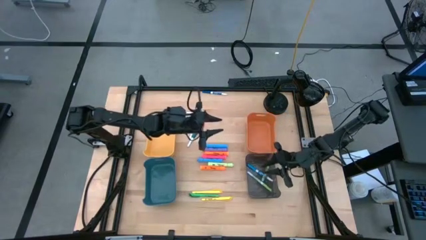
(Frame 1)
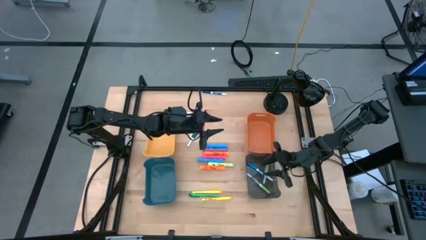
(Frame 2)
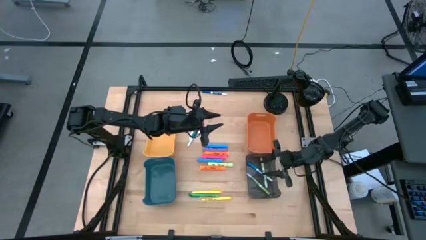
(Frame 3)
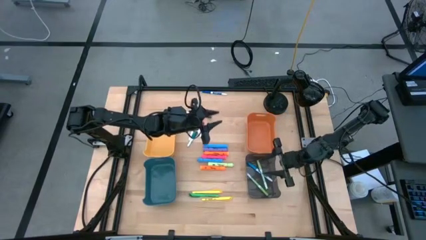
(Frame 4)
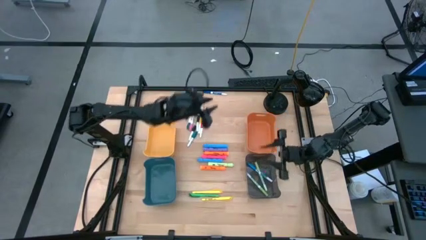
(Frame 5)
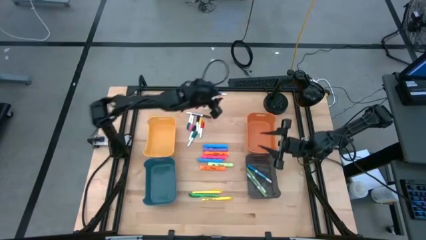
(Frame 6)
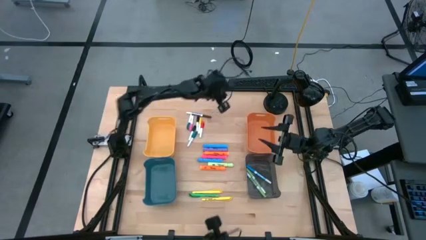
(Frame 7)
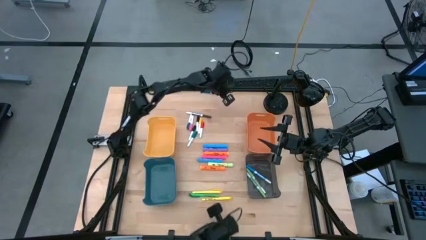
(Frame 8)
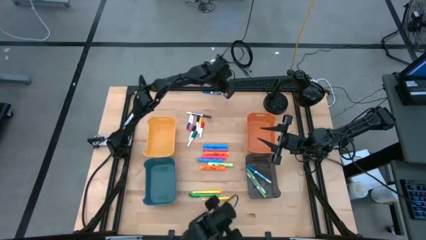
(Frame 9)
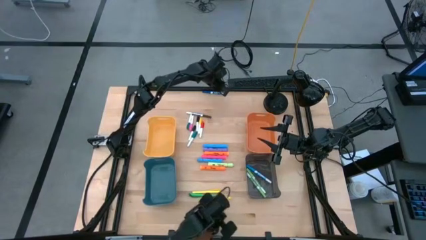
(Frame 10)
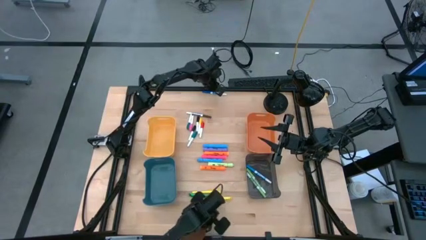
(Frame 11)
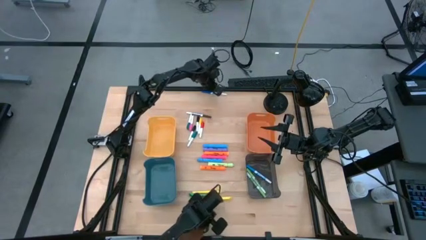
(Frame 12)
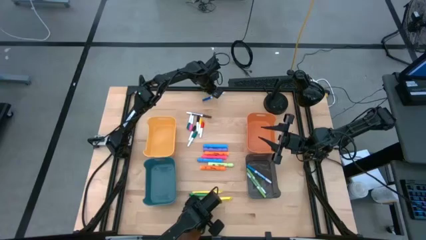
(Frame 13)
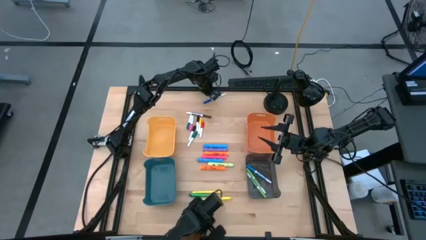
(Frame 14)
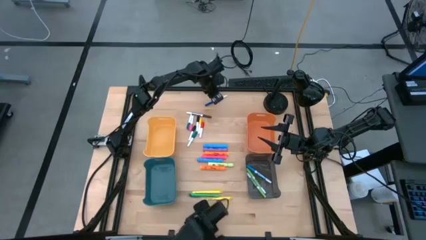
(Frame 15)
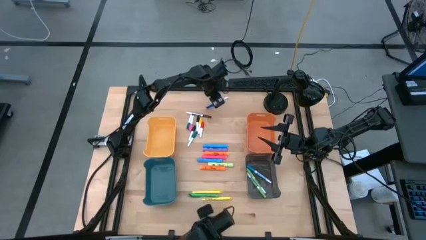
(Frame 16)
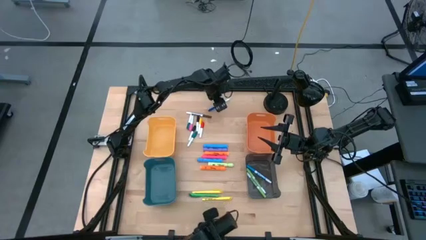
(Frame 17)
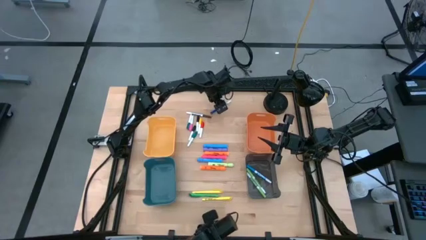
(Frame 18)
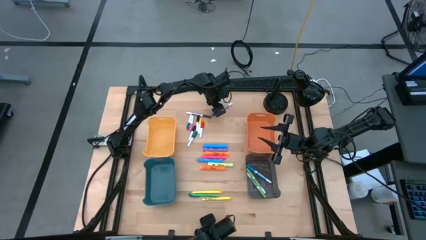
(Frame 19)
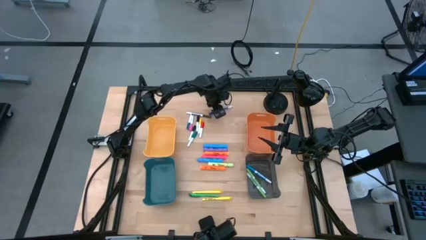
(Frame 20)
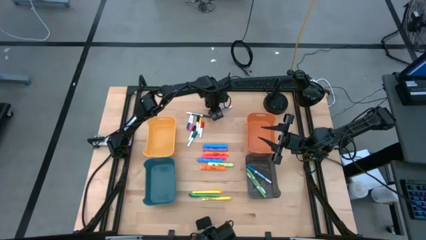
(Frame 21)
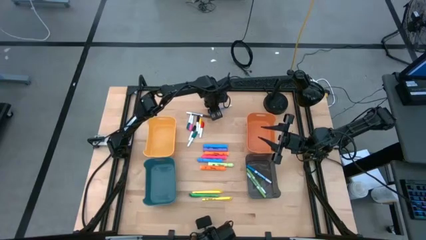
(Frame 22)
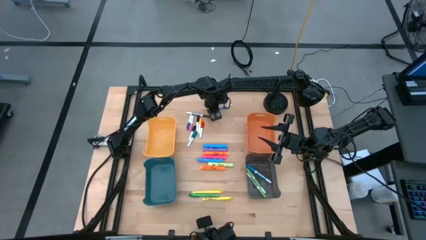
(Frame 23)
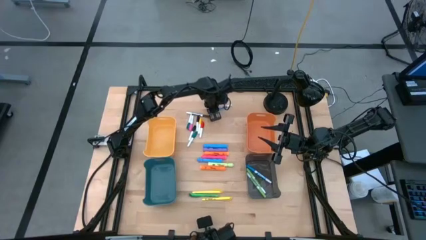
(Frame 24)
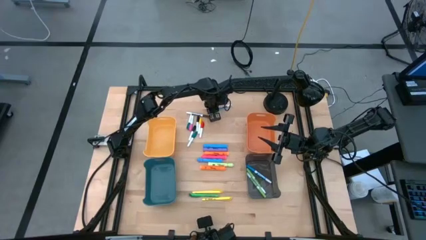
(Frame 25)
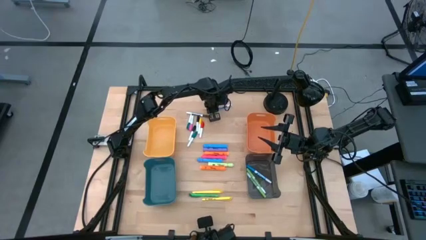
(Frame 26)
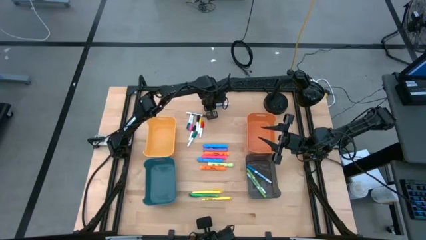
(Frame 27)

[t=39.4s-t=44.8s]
Task: Pick & Place Markers
Put the blue dry erase marker into the black bin

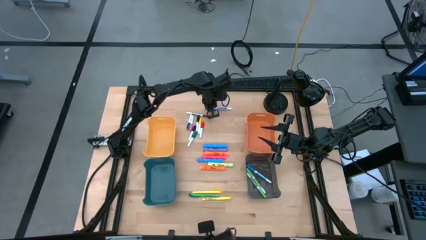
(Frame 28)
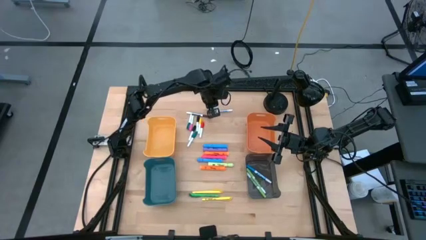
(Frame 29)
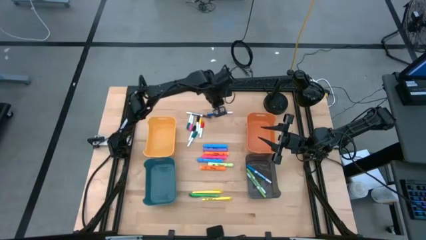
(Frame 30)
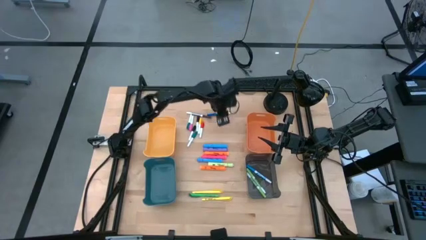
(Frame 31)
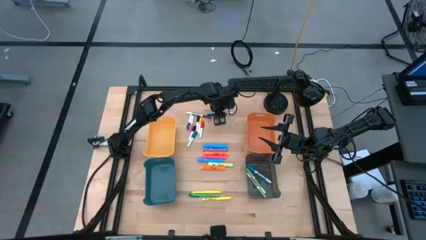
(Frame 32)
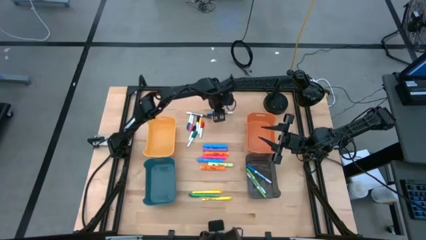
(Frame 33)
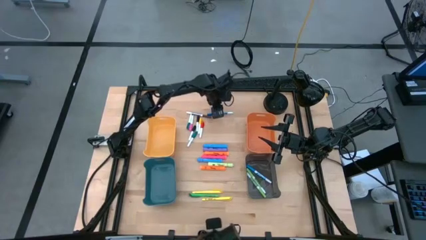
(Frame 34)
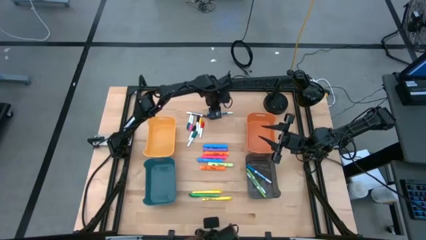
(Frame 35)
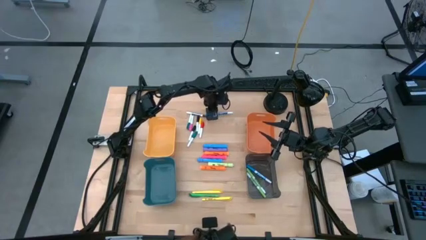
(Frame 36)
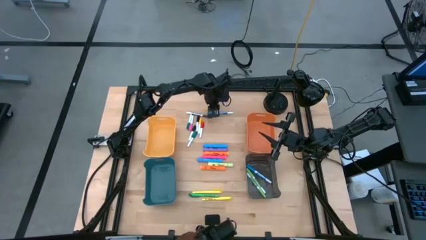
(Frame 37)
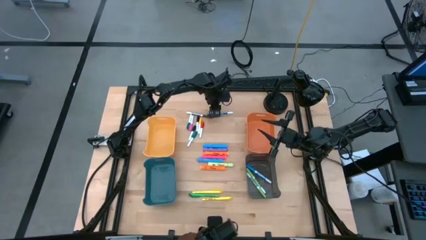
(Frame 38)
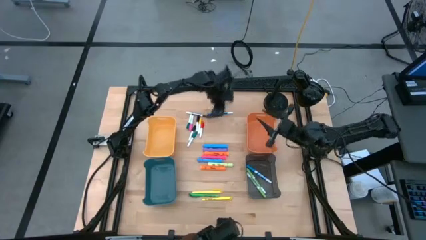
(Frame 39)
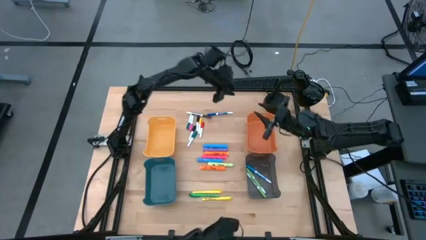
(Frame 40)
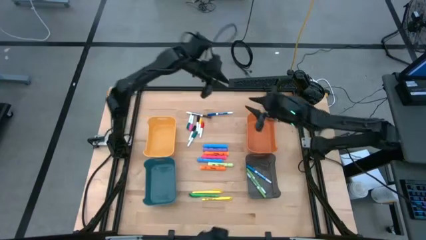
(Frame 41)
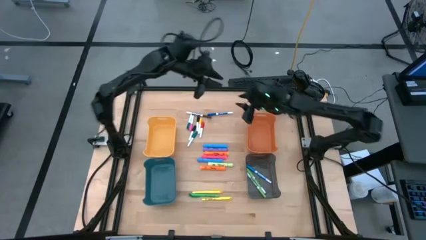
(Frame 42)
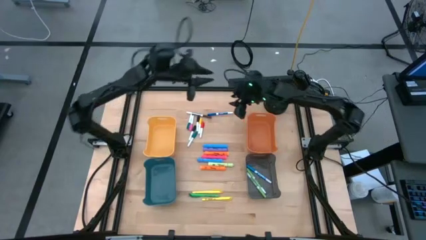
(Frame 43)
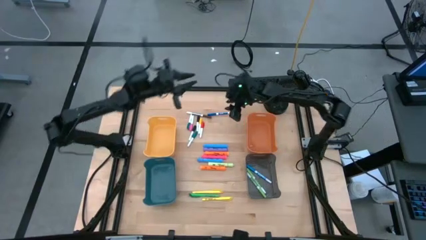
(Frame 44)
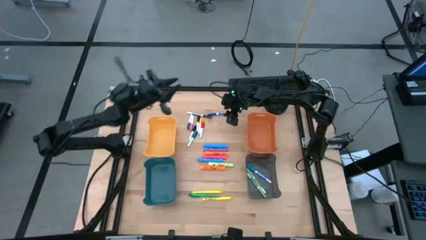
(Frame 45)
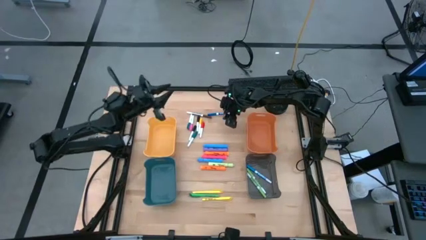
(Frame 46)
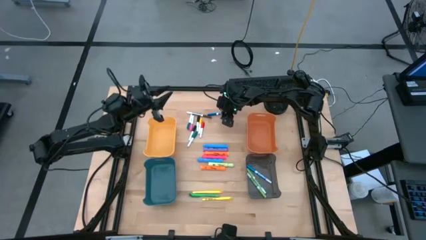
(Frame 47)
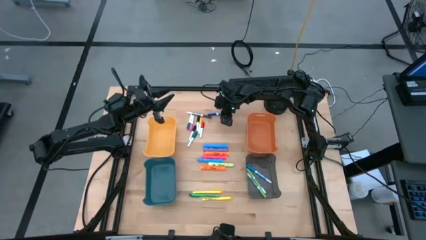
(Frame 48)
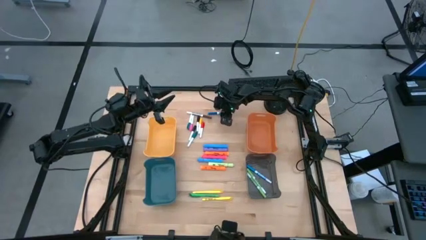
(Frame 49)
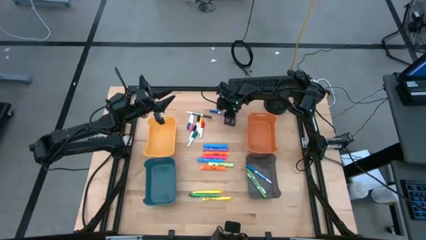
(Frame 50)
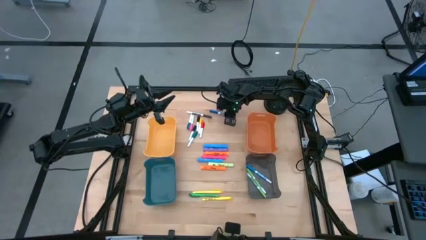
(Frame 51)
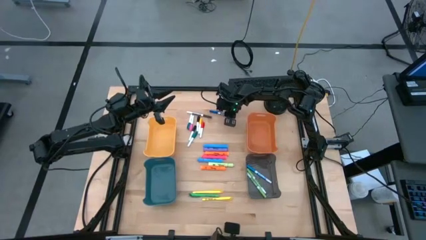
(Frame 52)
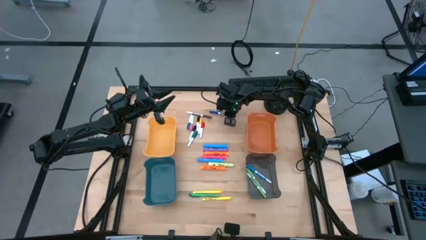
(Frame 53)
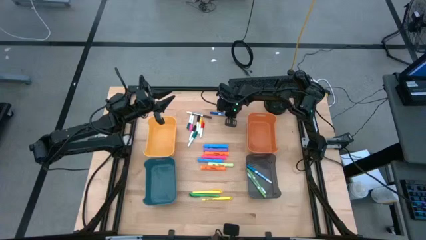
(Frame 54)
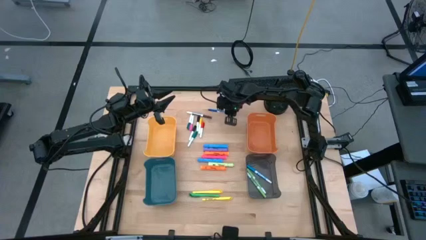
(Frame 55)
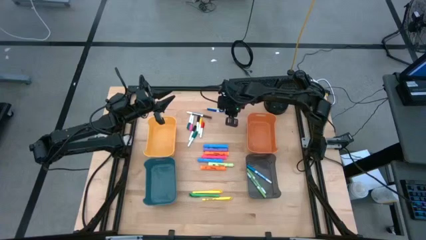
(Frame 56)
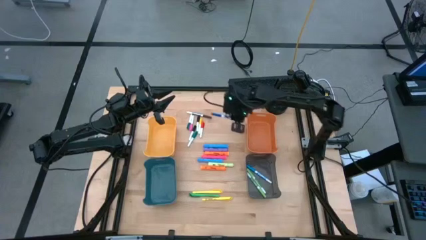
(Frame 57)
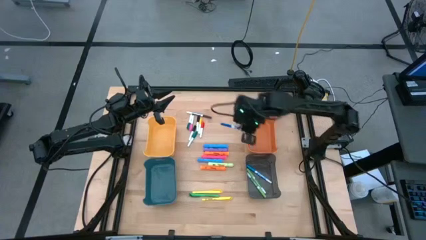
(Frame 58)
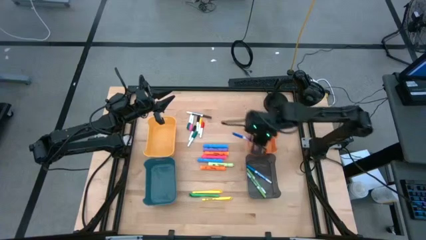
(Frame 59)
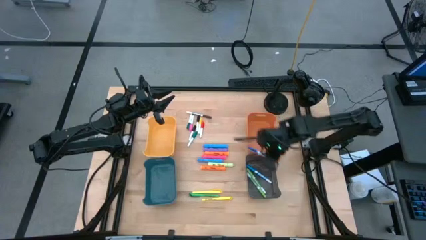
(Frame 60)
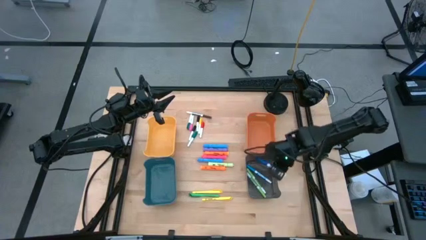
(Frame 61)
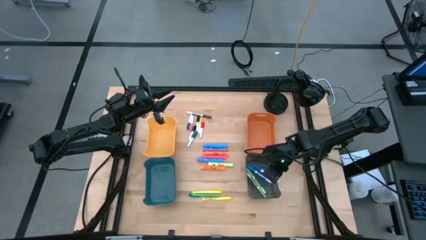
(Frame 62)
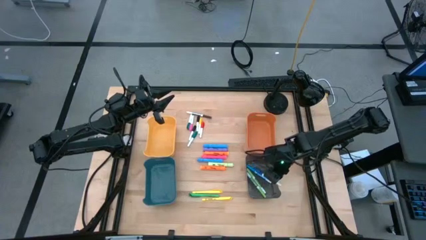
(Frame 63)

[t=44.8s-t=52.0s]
Put the blue dry erase marker into the black bin

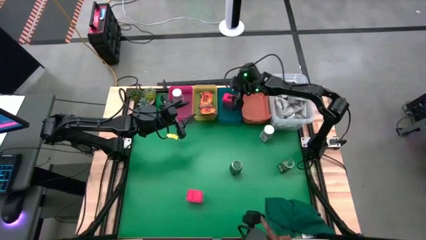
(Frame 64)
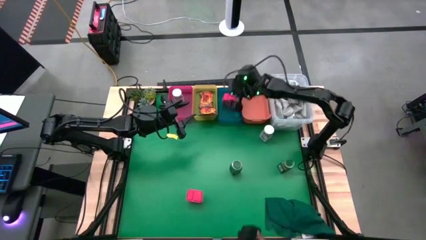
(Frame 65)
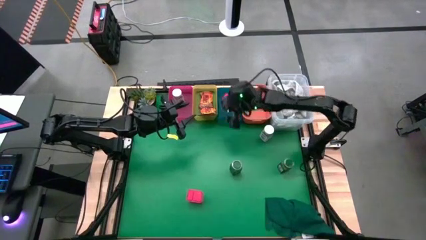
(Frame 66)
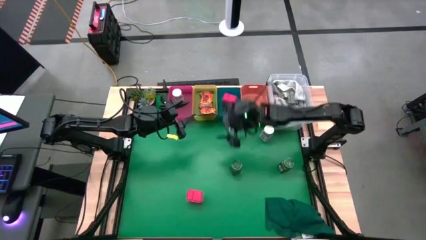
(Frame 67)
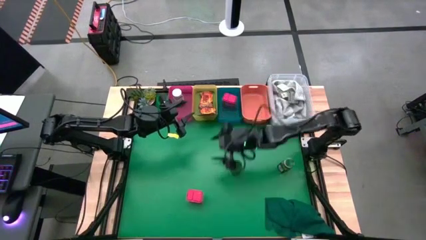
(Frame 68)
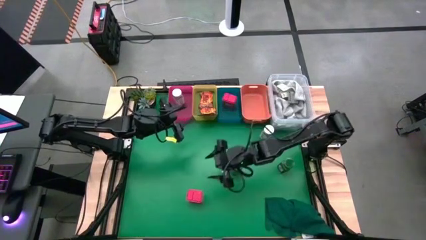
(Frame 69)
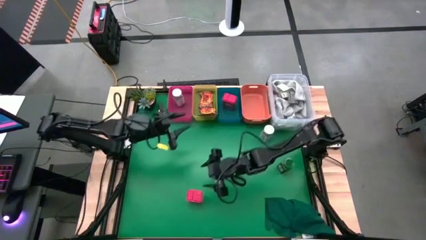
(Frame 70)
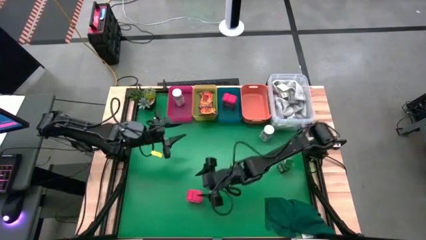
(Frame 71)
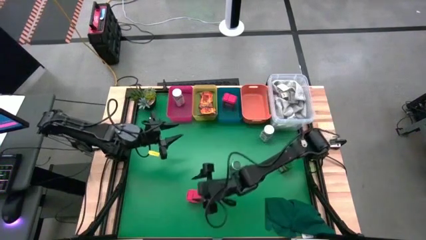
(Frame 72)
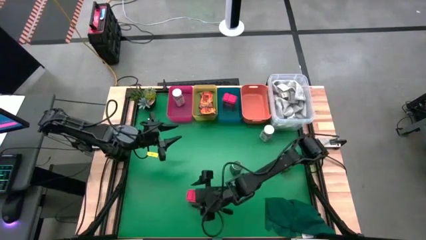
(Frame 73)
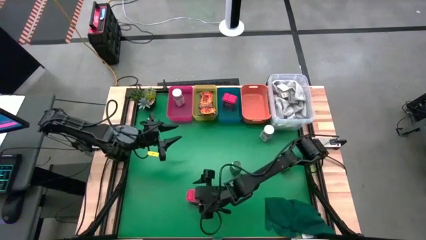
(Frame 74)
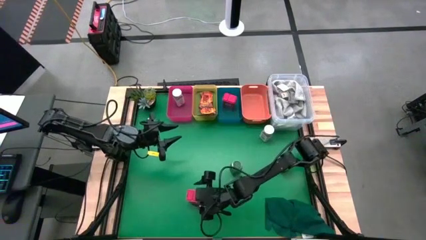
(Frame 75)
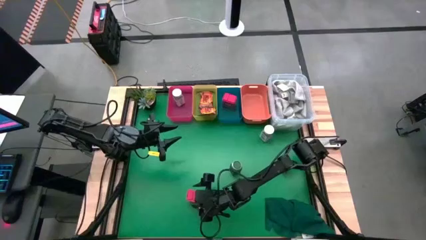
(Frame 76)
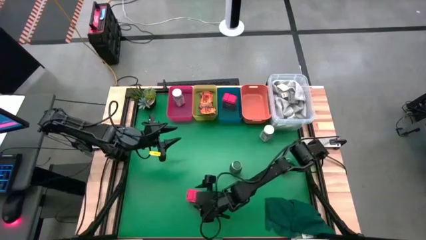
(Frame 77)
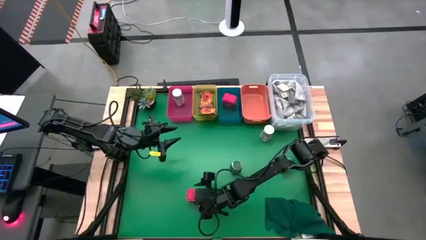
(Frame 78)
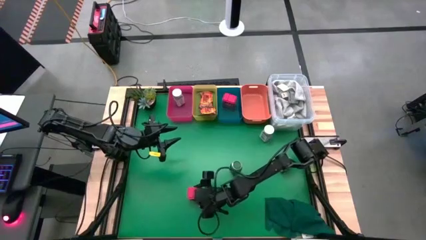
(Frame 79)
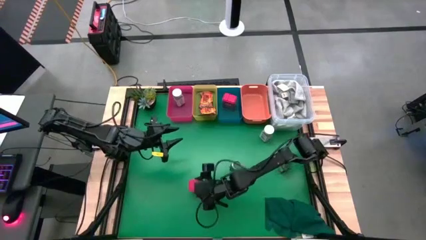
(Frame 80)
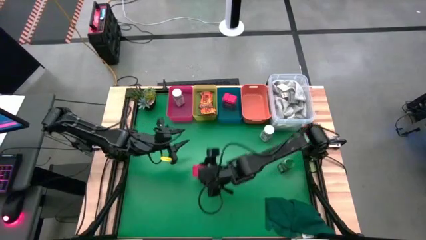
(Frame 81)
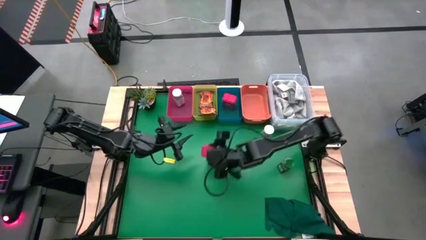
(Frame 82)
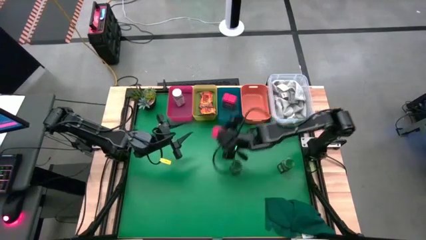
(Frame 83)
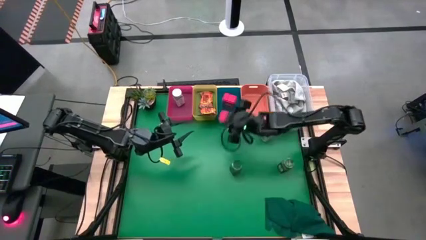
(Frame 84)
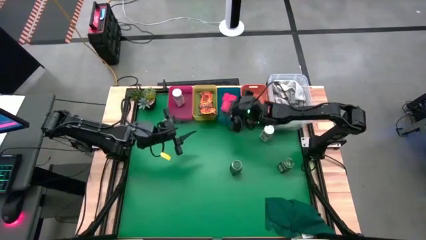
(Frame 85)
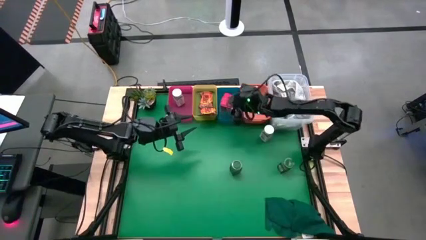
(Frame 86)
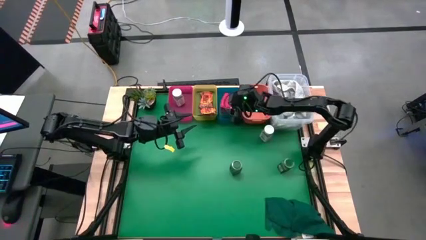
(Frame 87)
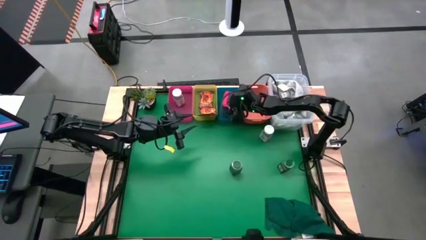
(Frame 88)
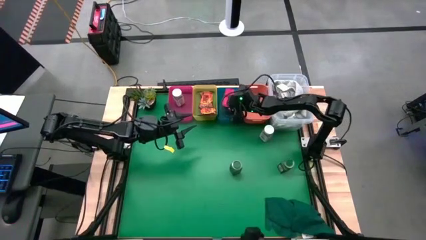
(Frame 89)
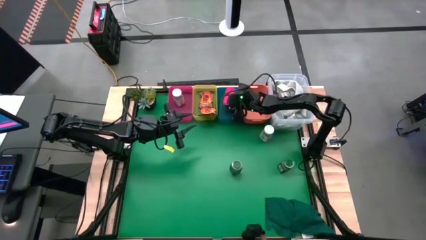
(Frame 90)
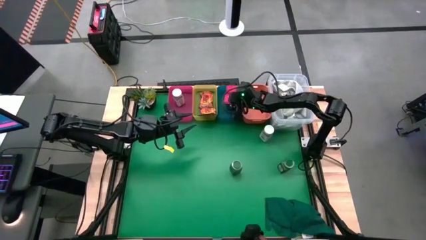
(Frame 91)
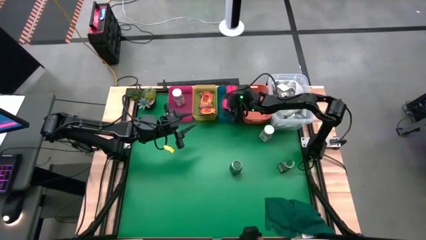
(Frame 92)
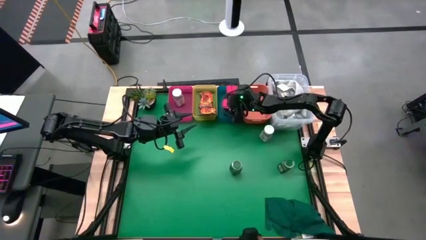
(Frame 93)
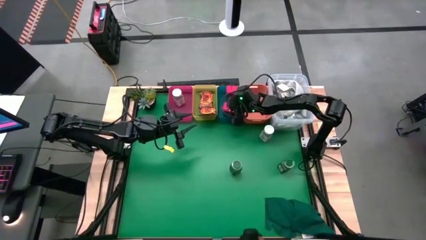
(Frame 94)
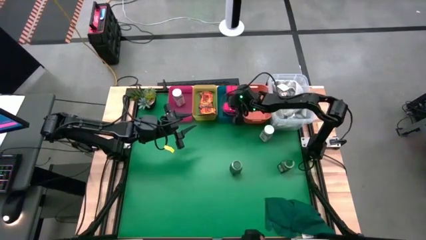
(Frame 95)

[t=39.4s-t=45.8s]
Task: Sort spices by type
Put the red seasoning can into the blue bin
